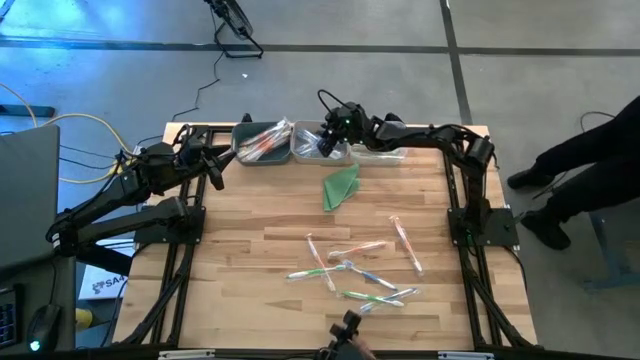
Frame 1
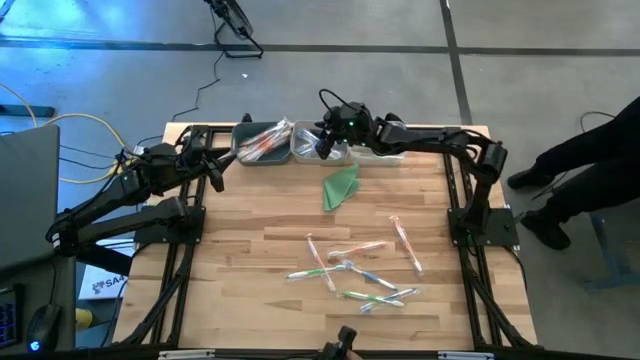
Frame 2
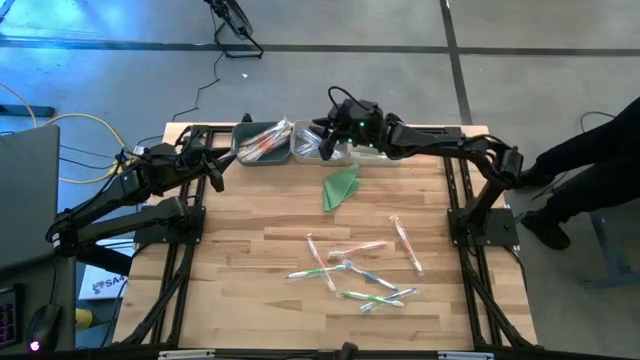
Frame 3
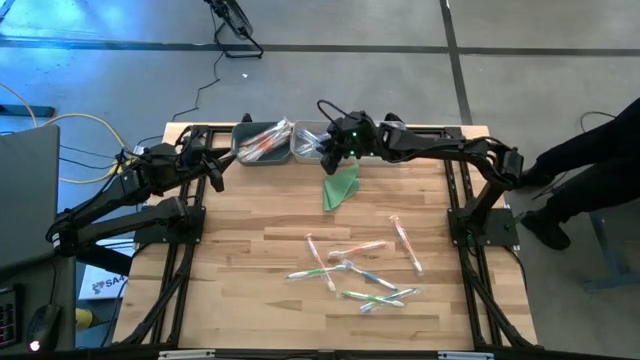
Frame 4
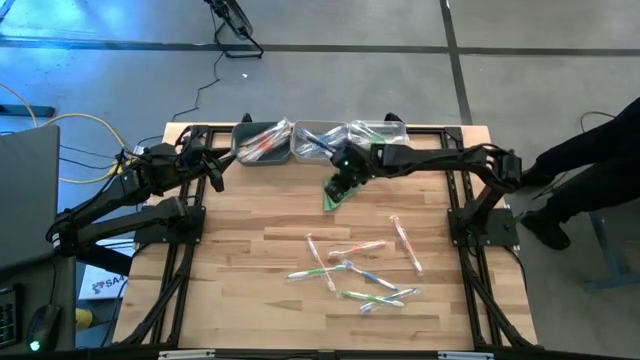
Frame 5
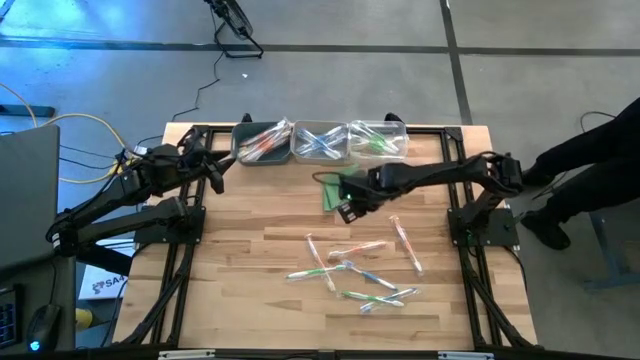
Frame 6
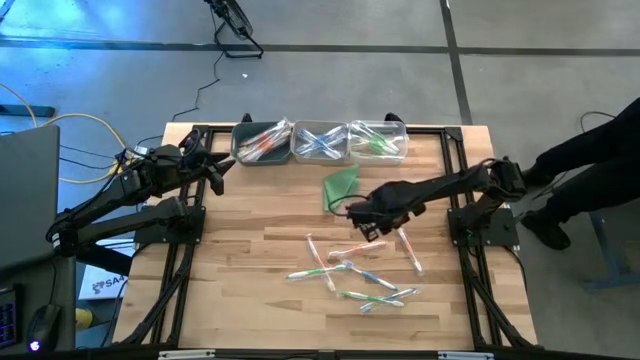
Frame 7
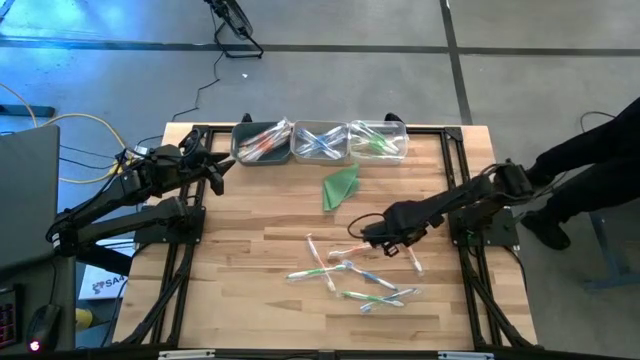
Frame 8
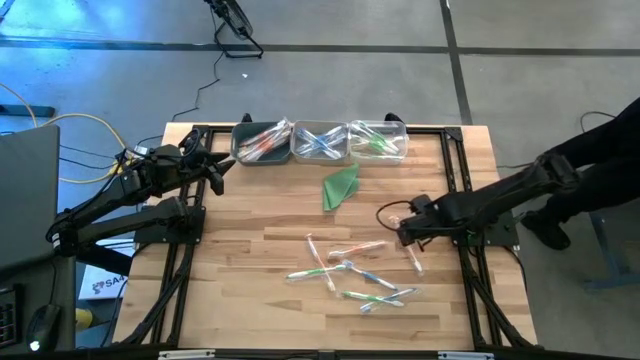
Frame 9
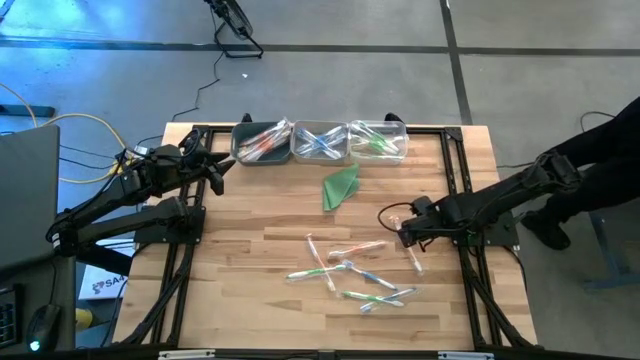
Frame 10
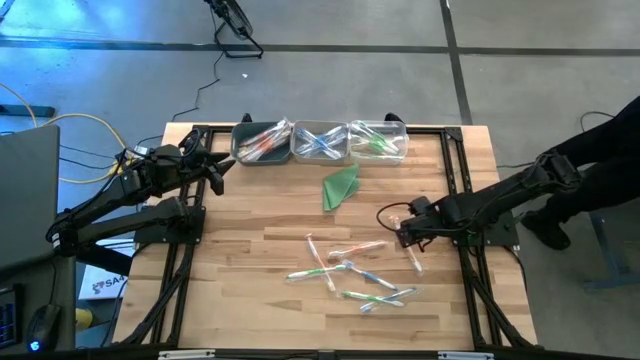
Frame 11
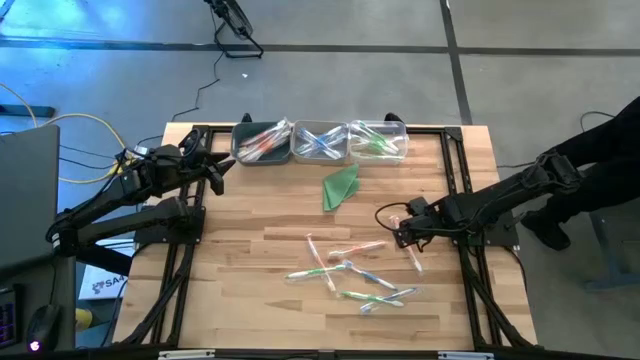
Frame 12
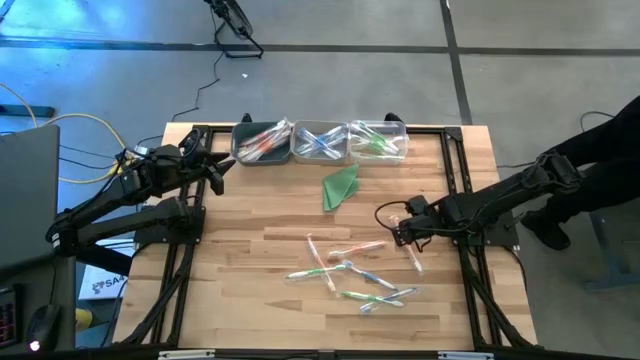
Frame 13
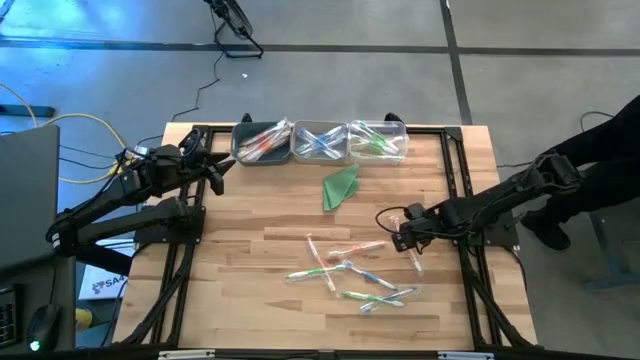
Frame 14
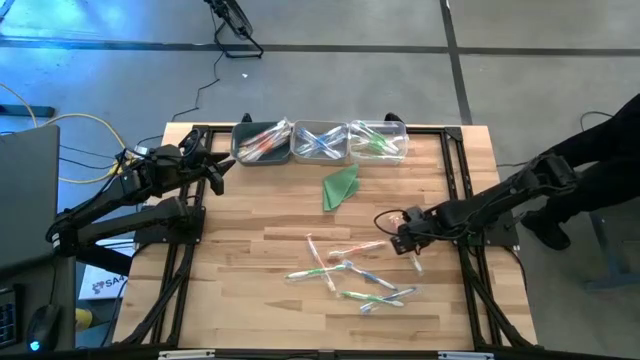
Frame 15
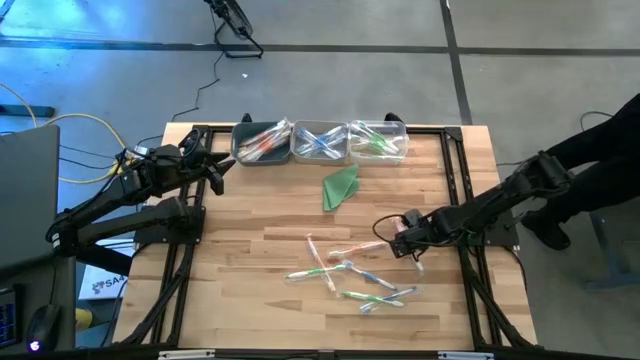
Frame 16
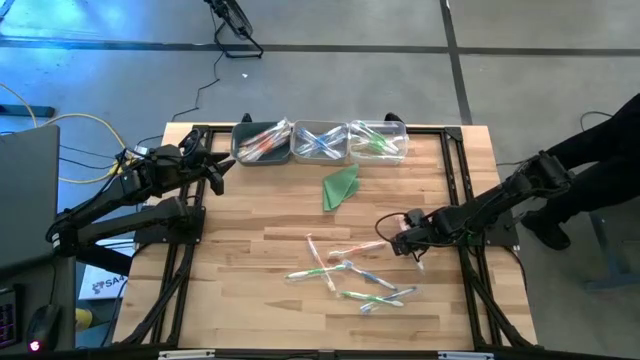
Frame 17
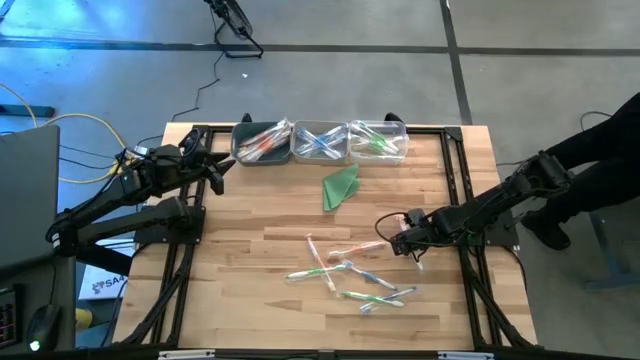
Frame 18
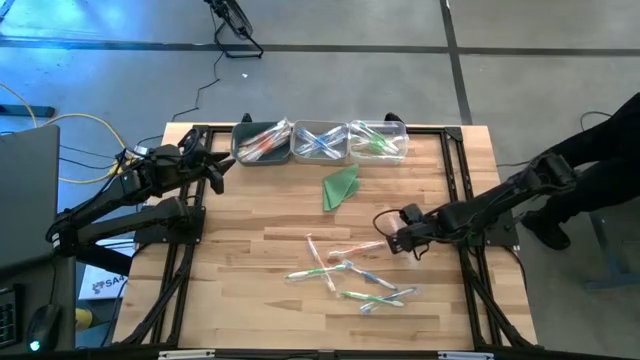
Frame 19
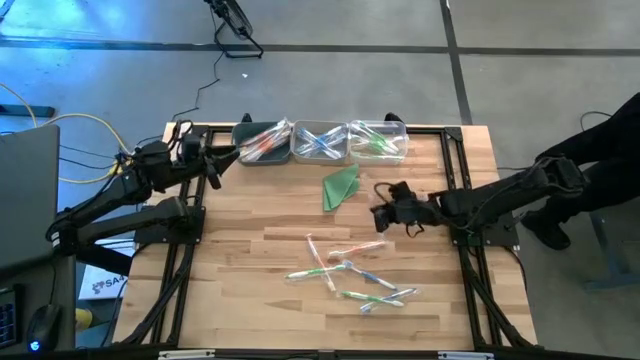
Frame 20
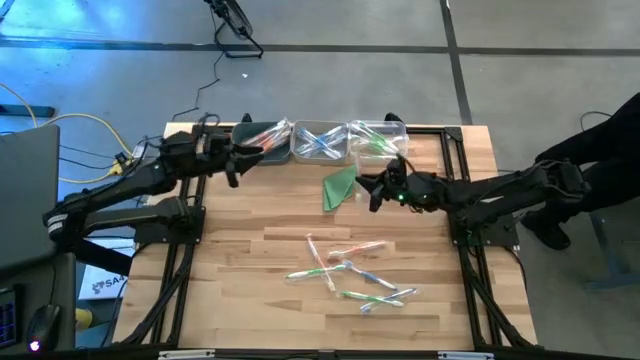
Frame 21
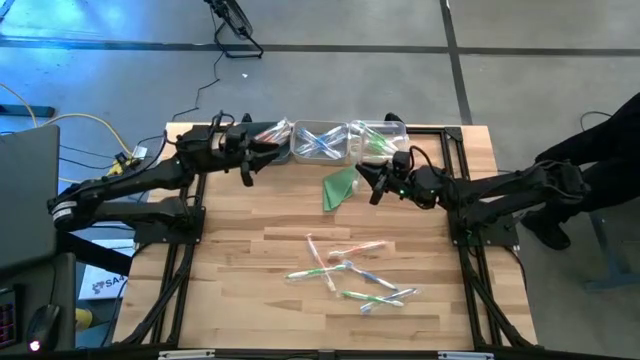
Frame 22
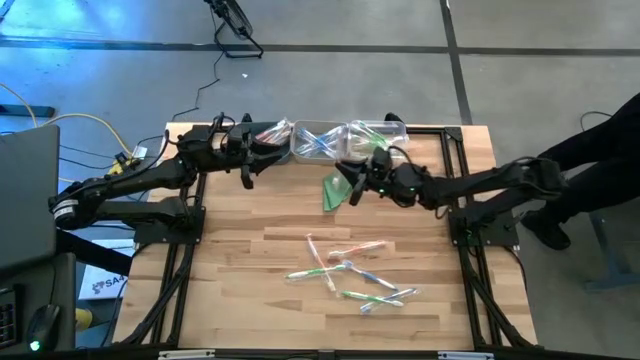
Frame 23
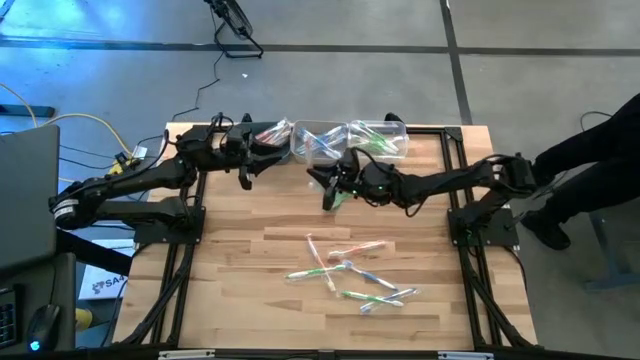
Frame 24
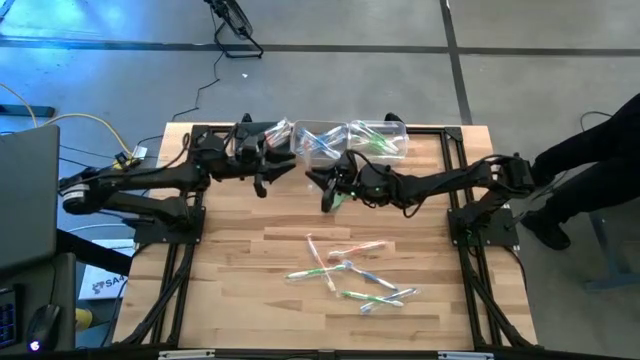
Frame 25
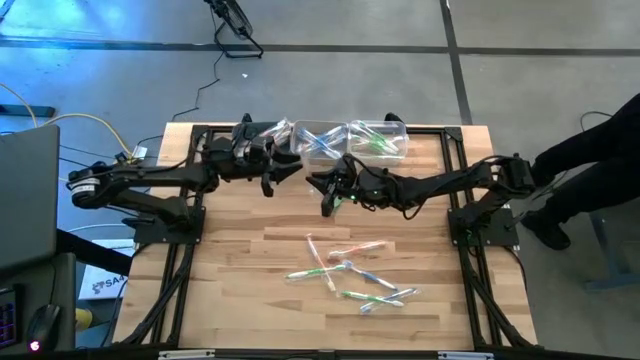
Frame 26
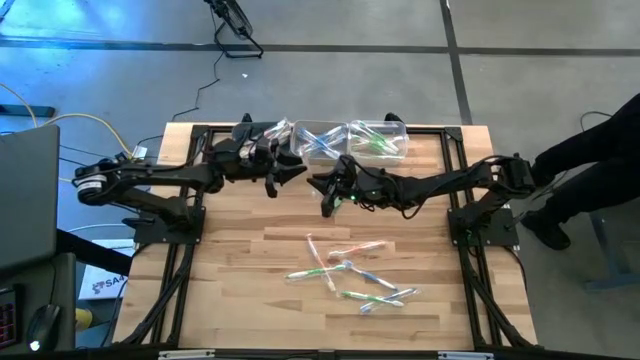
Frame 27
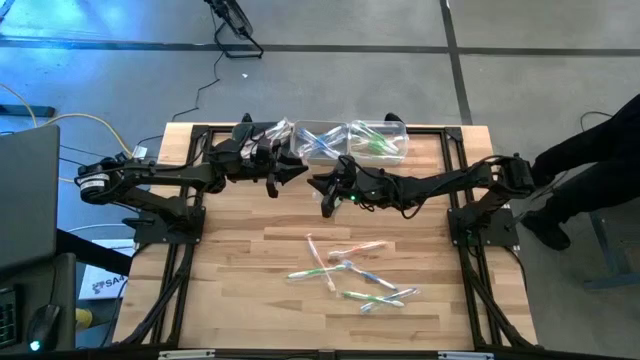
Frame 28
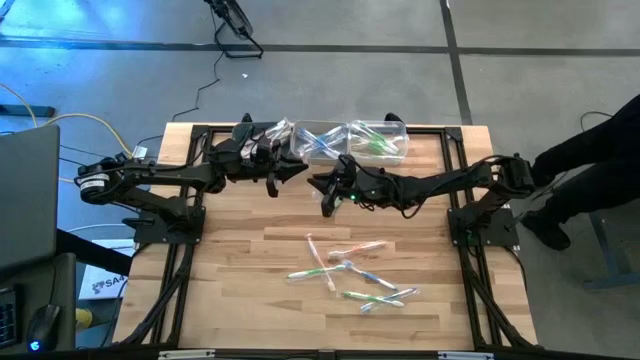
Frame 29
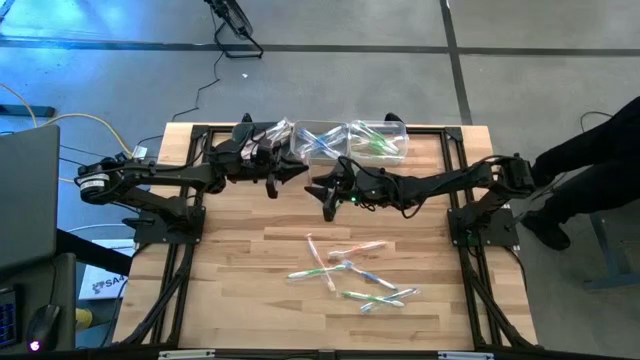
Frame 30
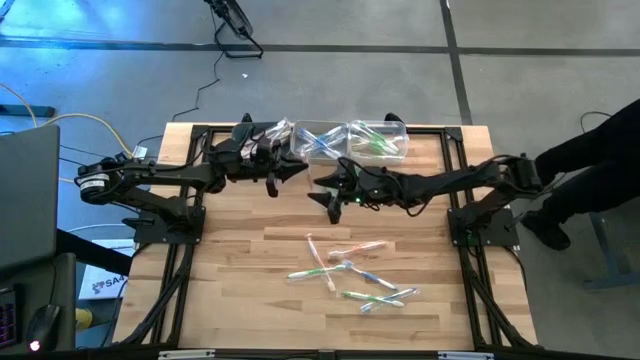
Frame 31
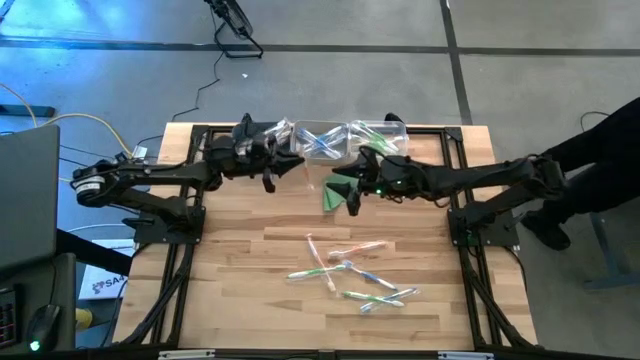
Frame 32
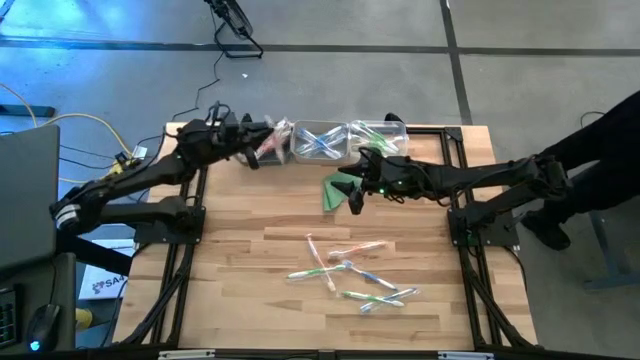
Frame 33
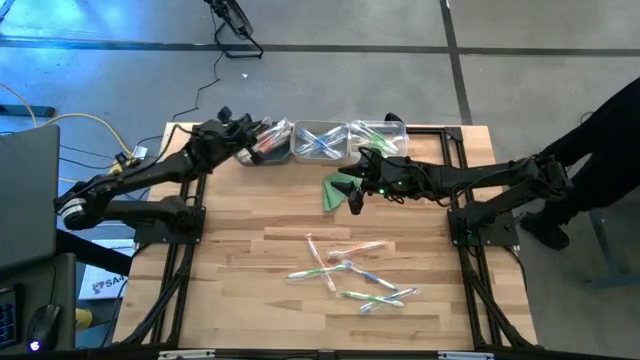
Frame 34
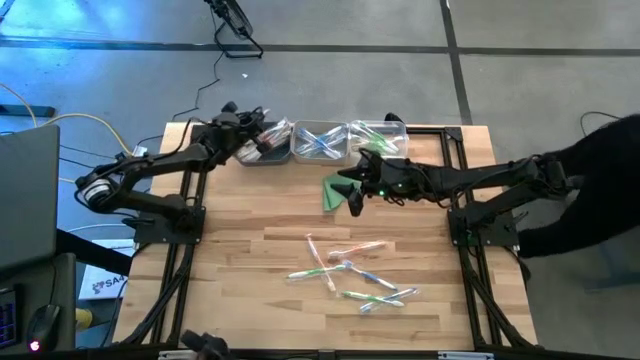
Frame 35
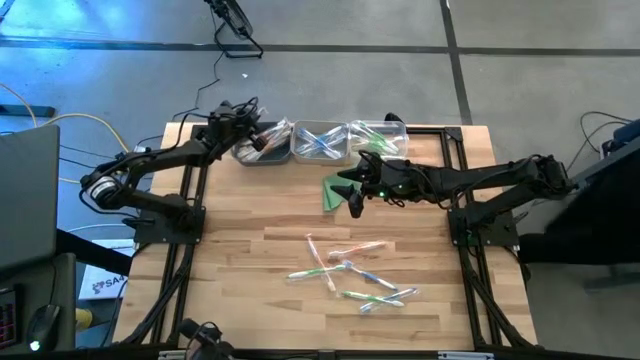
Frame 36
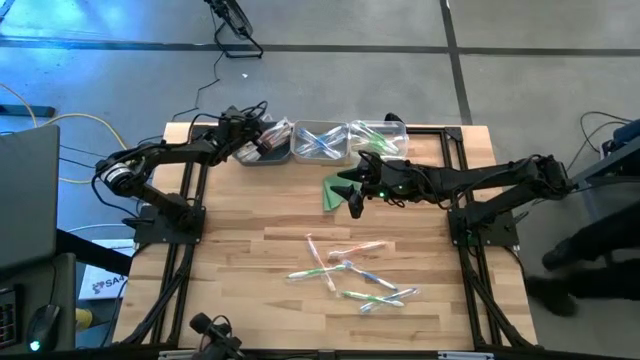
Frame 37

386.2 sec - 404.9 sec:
Task: Pick & Place Toothbrushes
Put the orange toothbrush into the dark blue bin

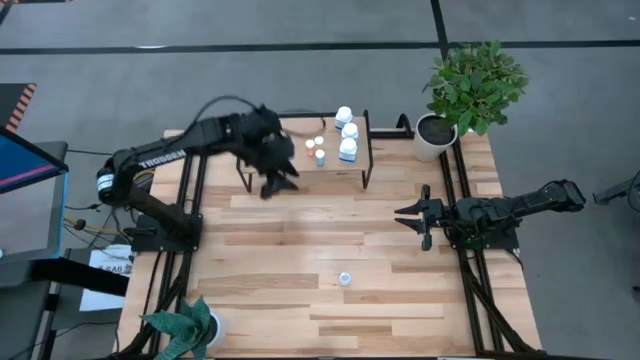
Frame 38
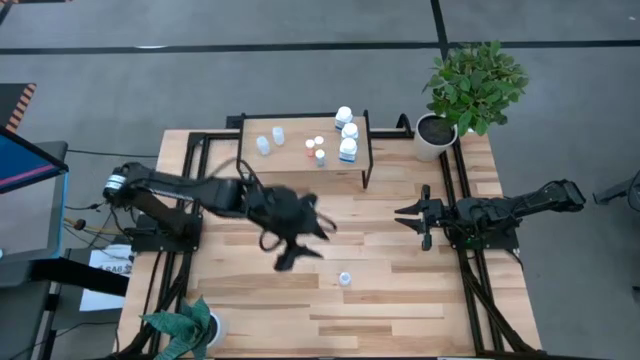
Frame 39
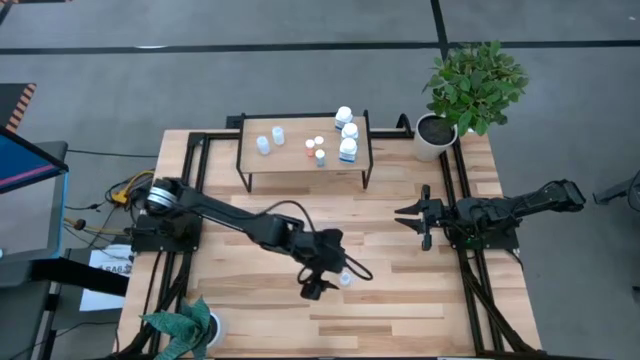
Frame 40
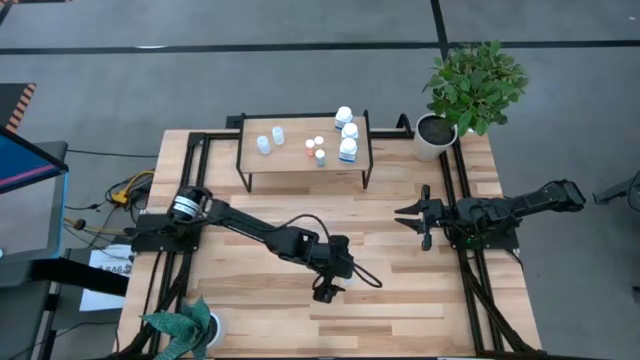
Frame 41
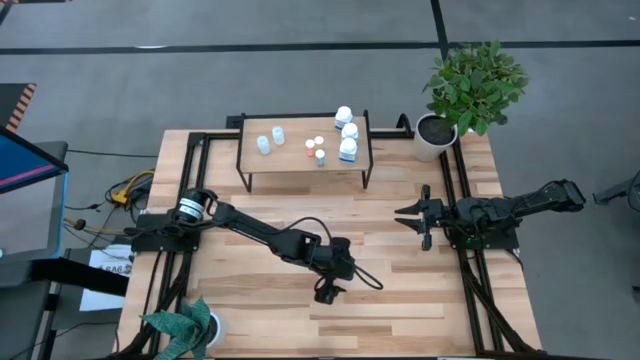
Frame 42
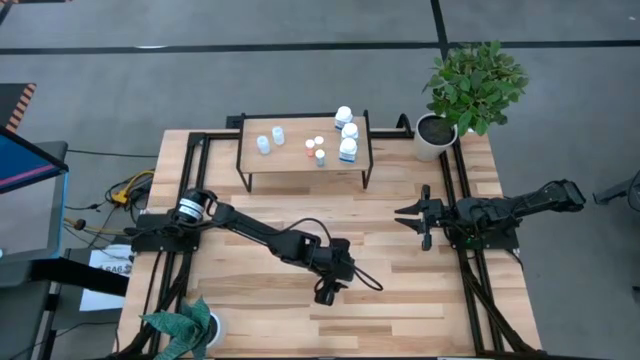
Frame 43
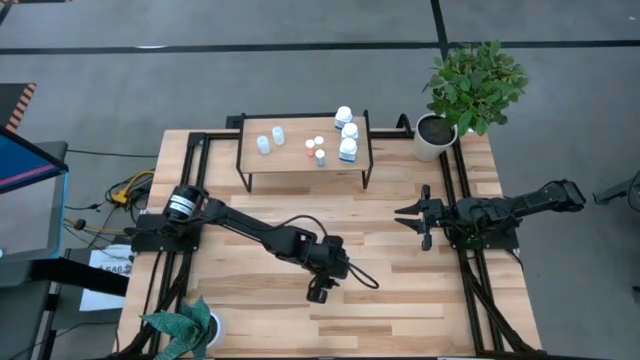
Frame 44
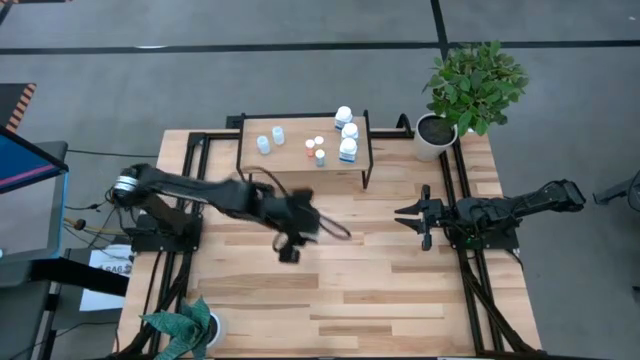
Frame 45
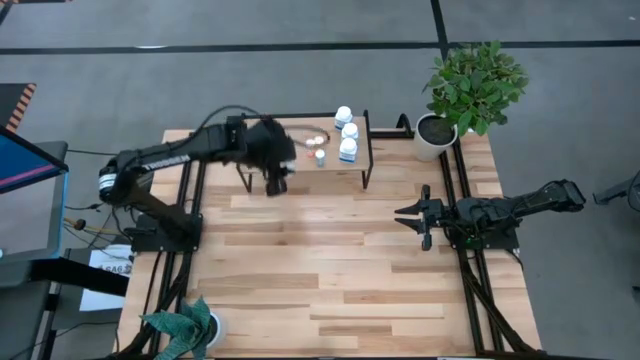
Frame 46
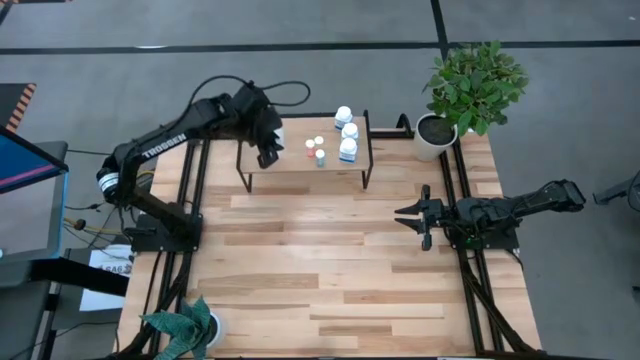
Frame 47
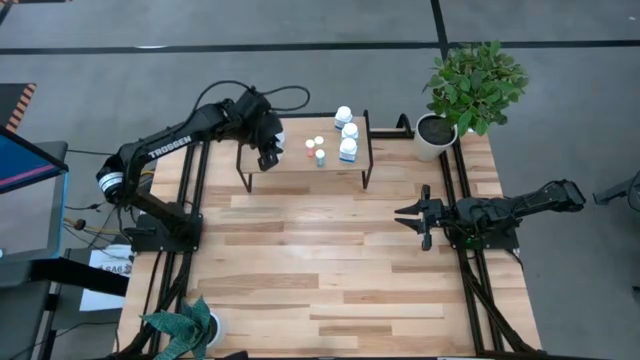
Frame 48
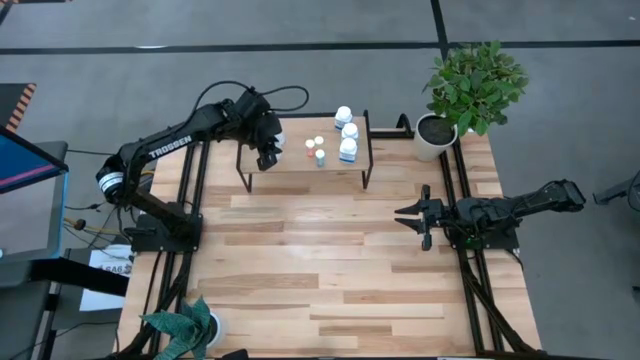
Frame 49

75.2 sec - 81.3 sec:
Task: Pick and place medicine bottles onto shelf by color
Put the transparent pill bottle on the shelf
